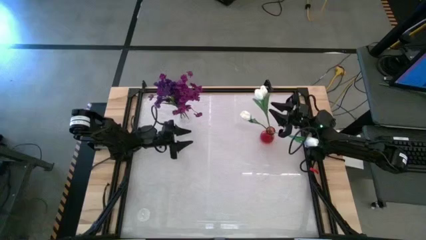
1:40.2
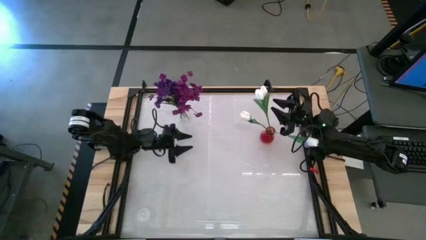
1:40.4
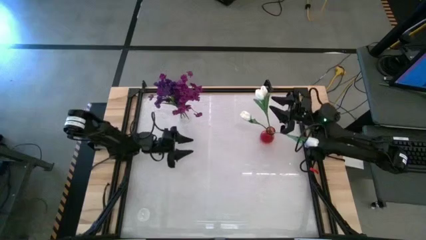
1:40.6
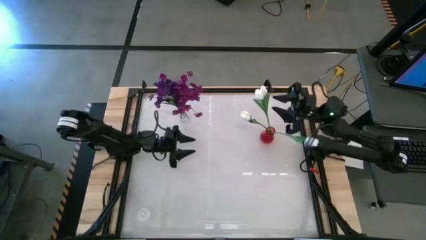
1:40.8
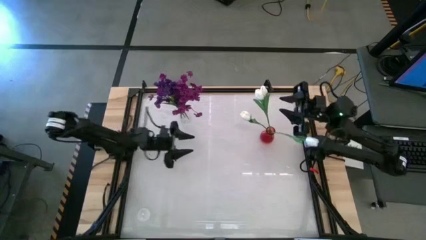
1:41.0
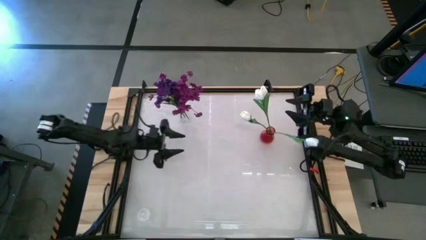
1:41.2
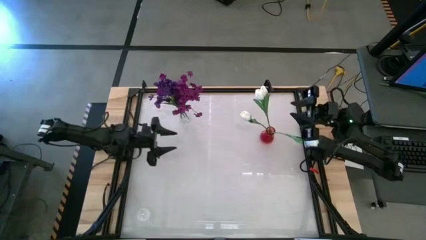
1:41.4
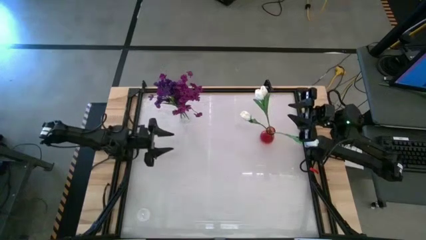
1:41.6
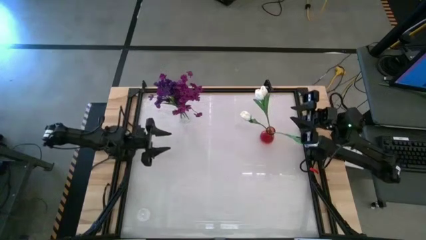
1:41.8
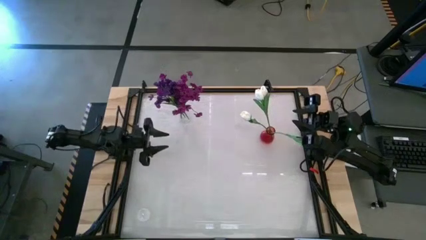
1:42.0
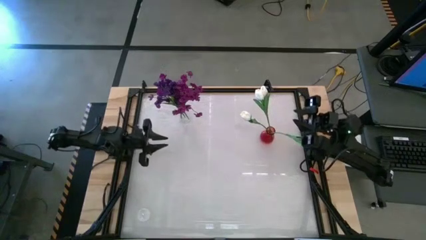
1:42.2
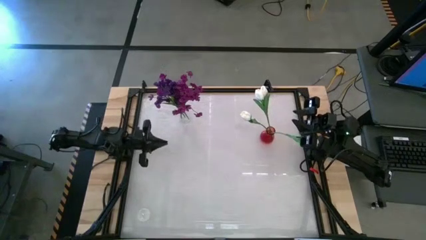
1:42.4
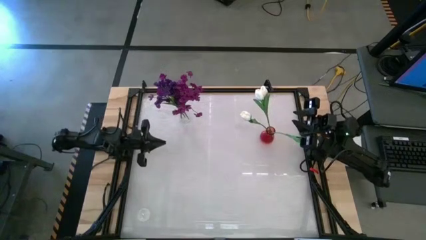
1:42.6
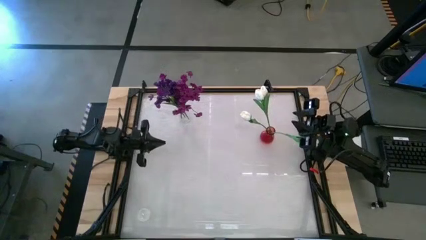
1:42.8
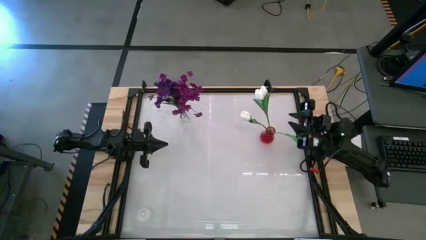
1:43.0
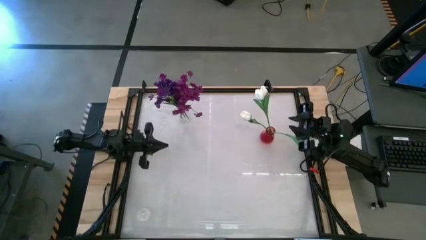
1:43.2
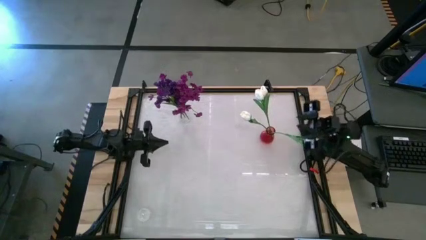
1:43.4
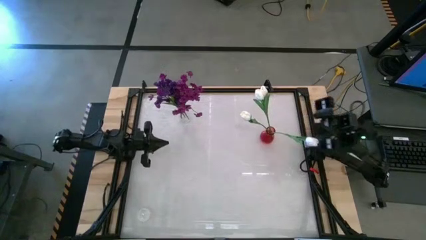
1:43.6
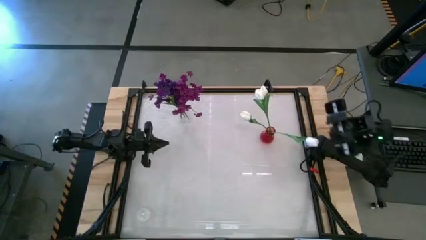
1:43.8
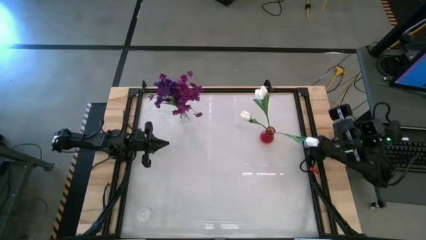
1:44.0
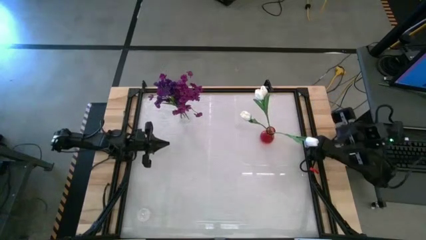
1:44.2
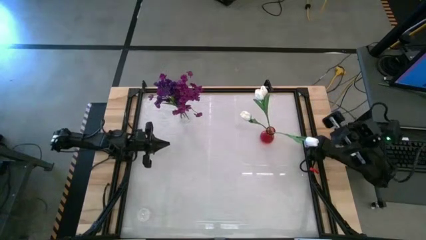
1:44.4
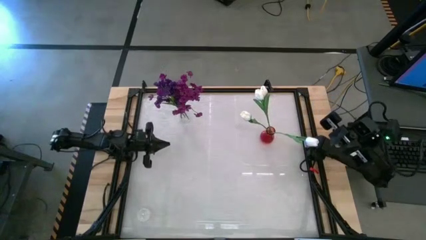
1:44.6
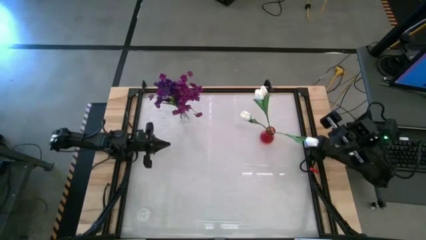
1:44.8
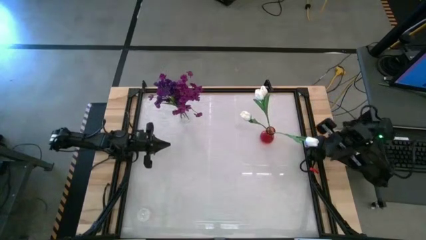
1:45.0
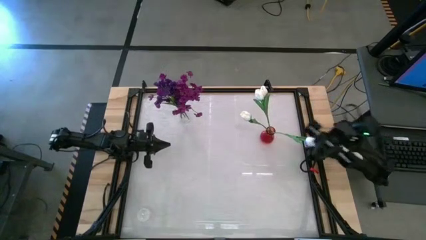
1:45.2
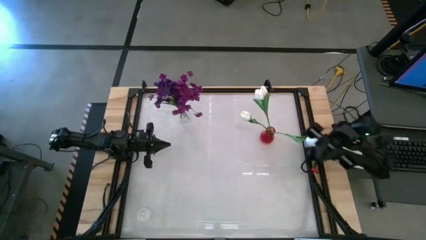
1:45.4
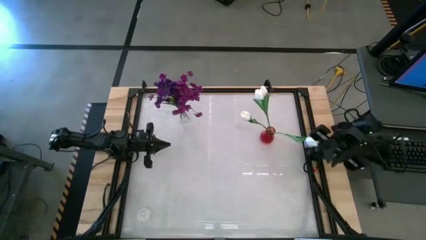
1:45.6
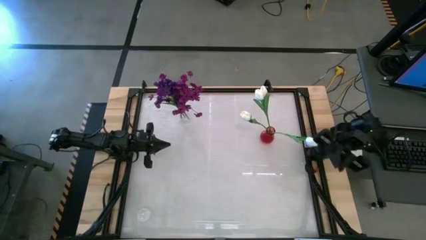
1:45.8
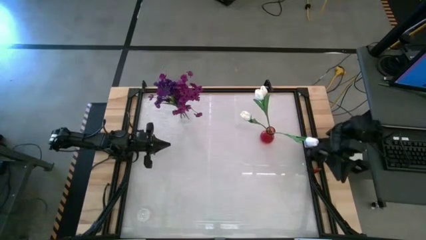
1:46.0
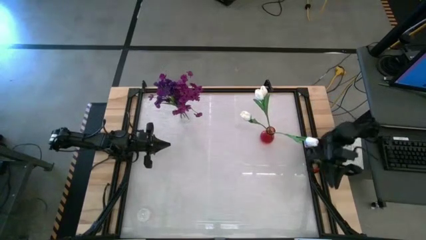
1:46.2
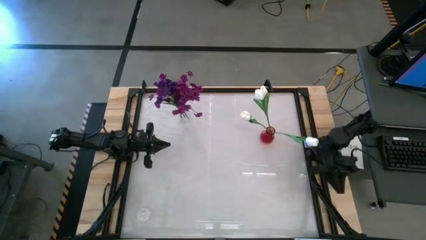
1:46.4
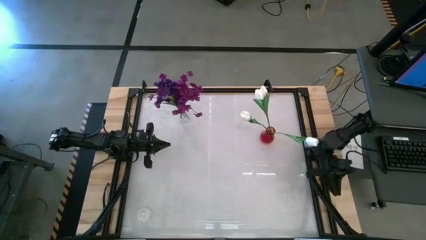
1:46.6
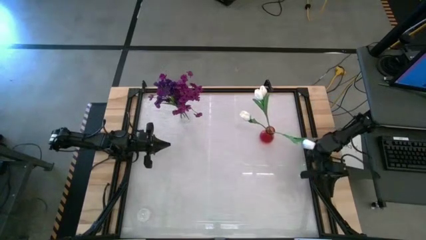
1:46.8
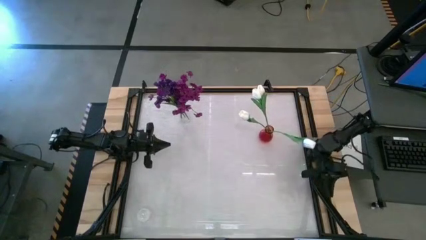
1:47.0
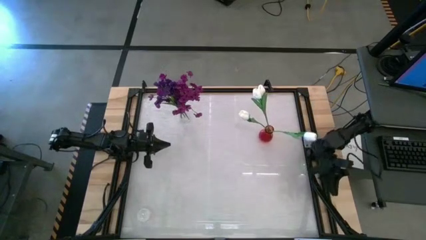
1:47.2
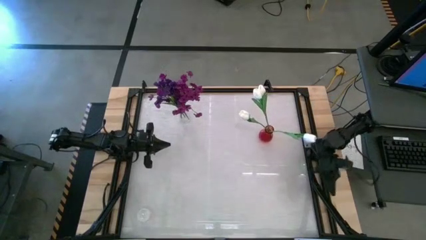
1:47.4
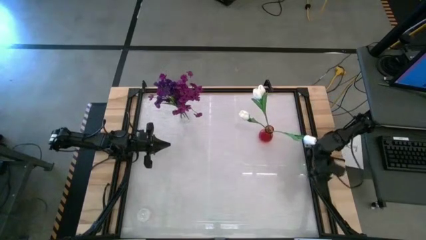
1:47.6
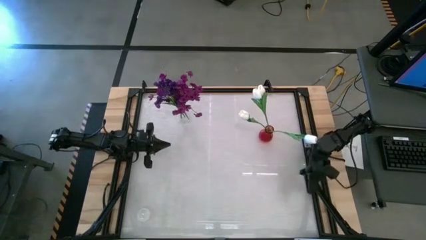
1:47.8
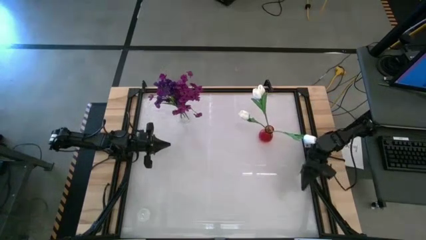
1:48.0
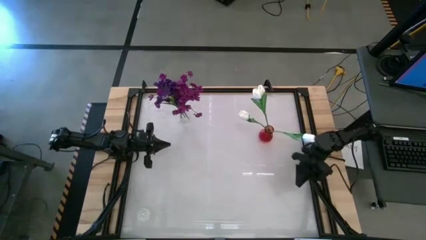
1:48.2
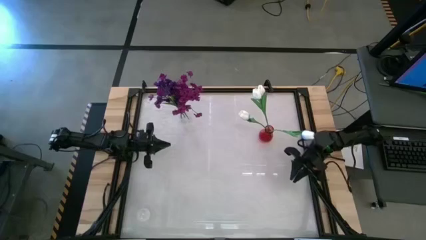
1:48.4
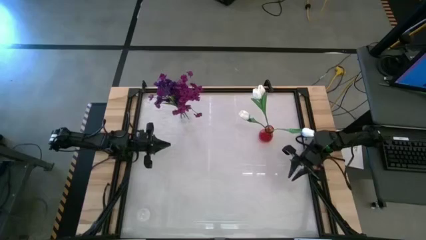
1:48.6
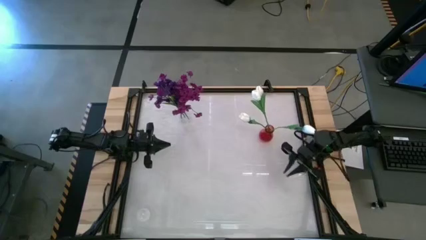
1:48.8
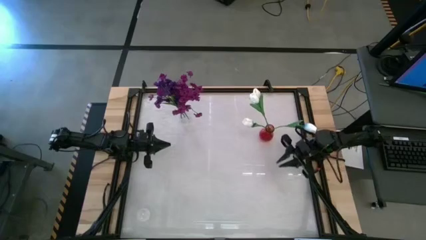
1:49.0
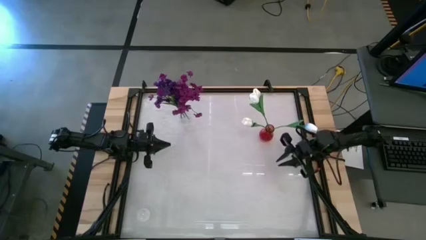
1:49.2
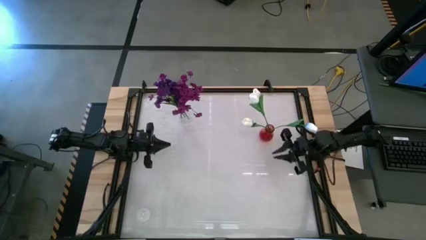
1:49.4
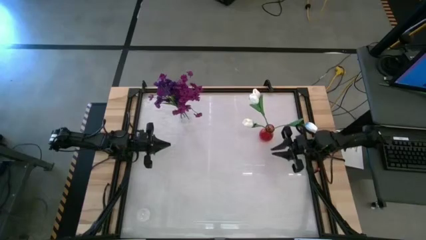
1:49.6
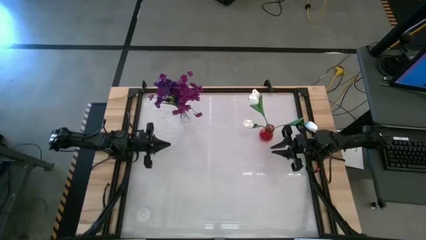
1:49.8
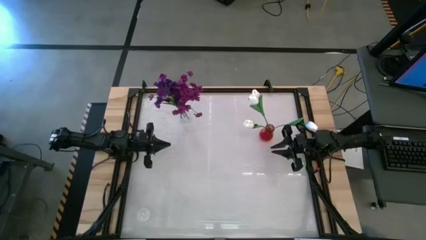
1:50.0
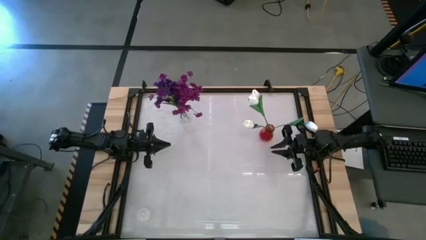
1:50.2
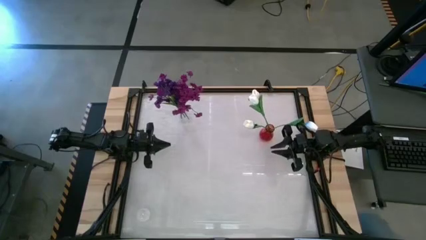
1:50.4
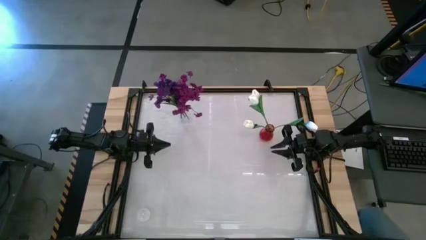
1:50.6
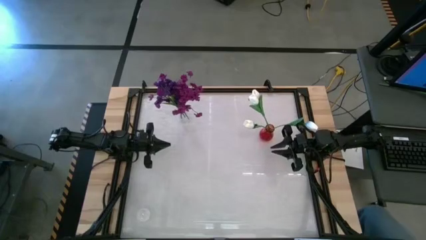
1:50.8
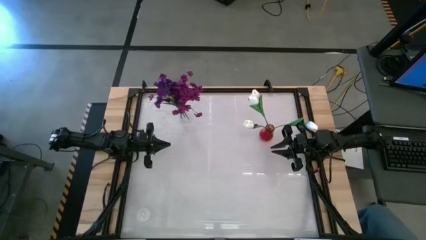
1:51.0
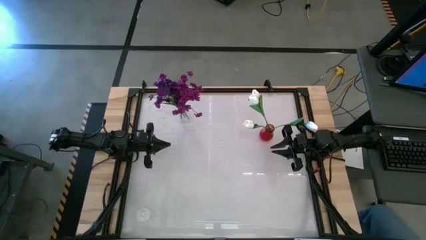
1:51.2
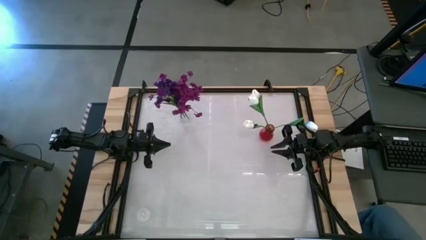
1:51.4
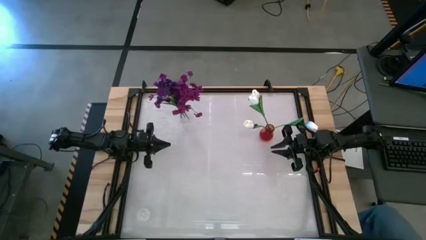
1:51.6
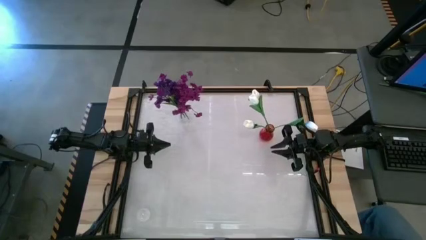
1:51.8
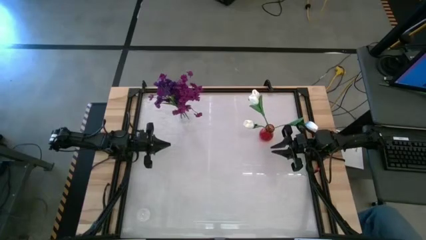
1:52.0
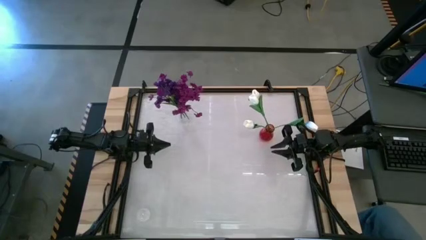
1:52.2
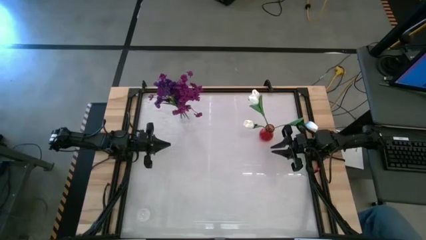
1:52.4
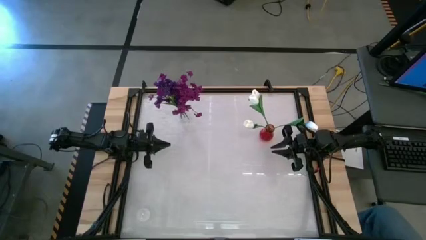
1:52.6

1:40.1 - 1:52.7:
Task: Sort flowers into vase by color
Return to Home Position

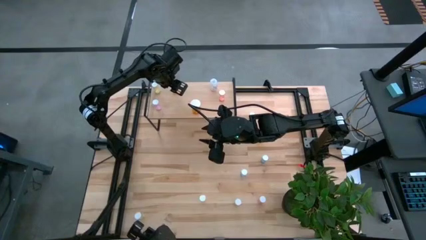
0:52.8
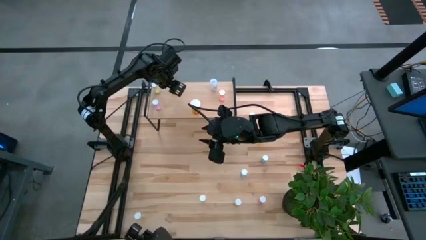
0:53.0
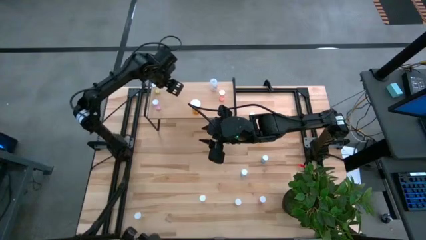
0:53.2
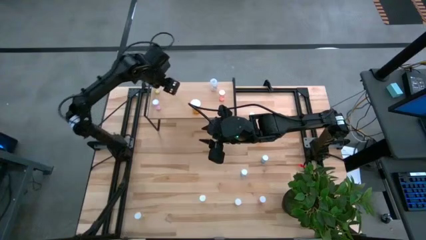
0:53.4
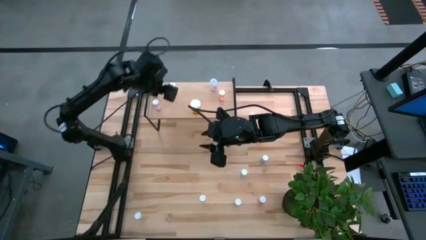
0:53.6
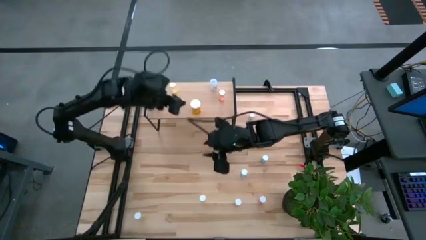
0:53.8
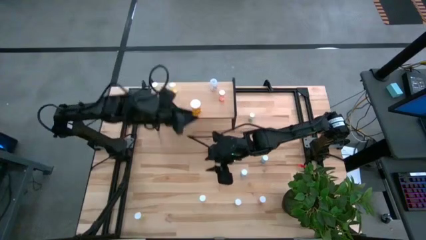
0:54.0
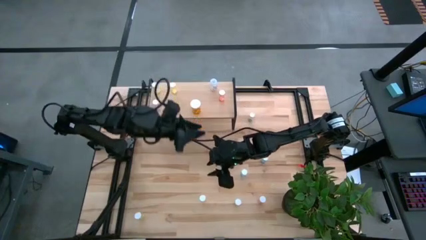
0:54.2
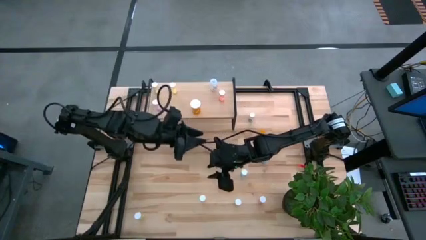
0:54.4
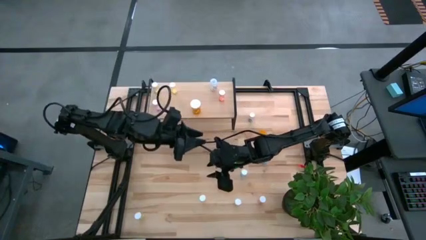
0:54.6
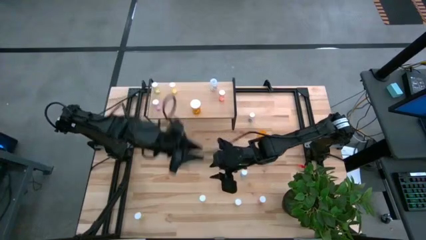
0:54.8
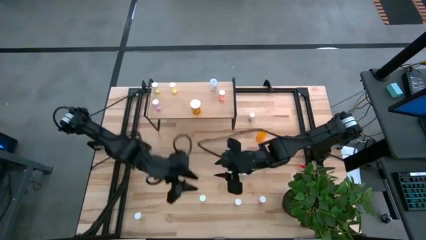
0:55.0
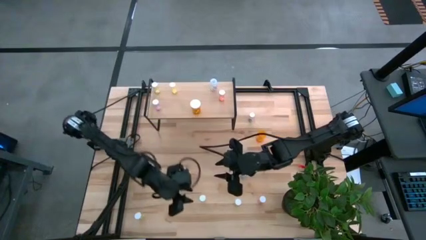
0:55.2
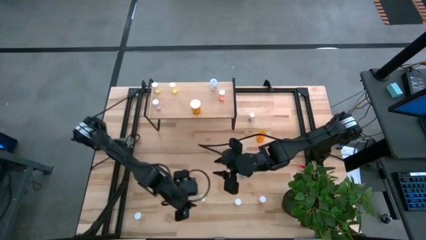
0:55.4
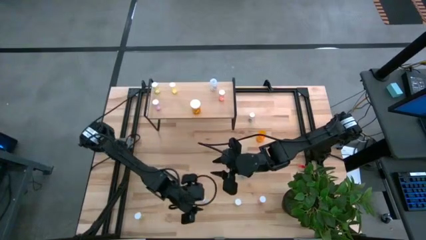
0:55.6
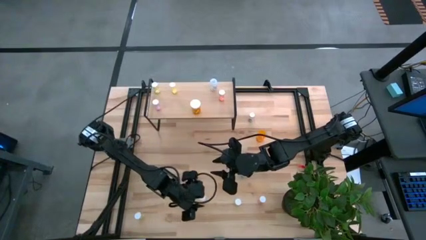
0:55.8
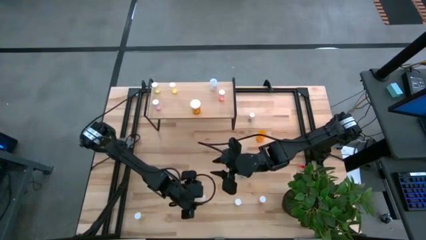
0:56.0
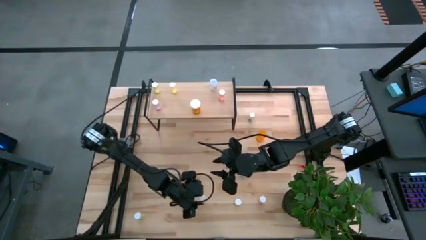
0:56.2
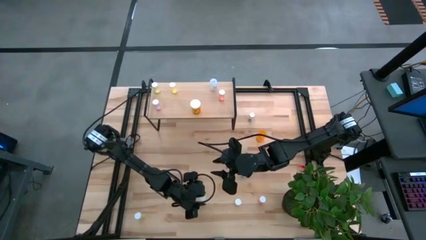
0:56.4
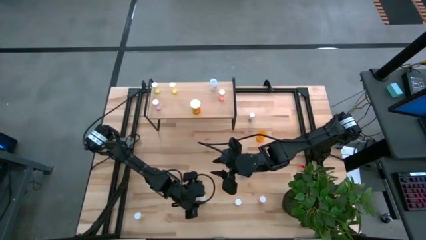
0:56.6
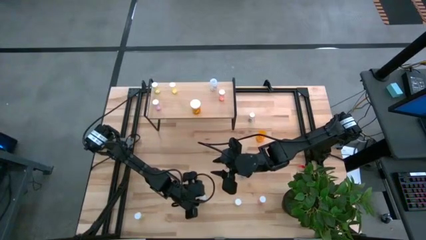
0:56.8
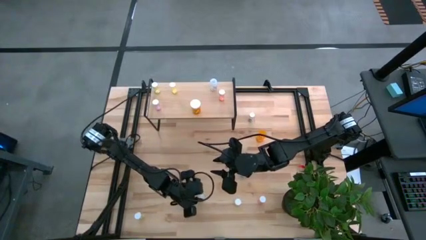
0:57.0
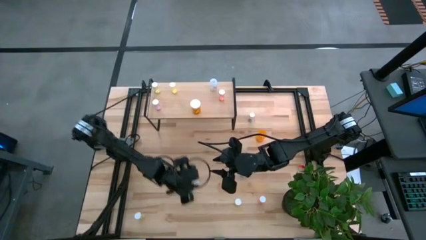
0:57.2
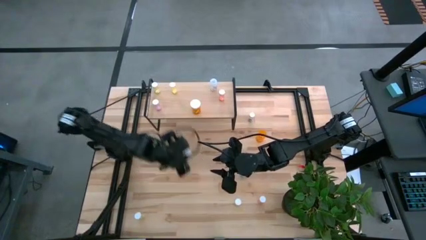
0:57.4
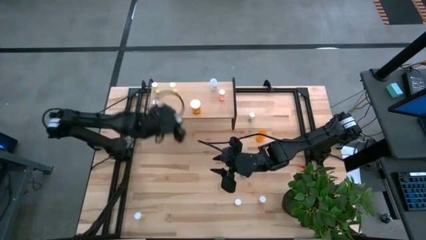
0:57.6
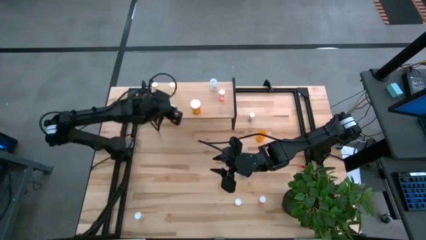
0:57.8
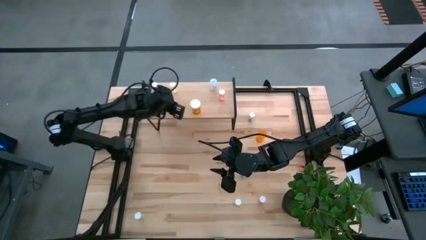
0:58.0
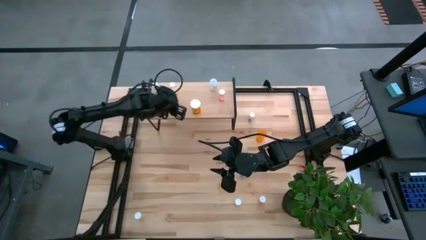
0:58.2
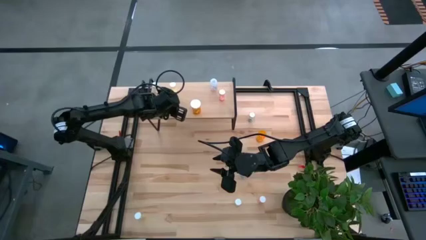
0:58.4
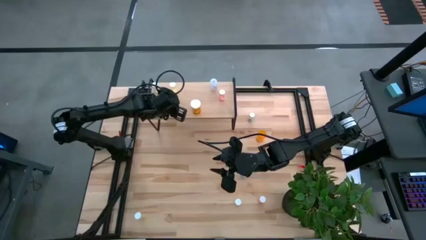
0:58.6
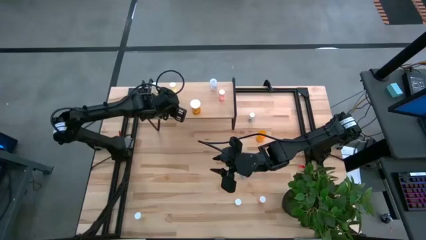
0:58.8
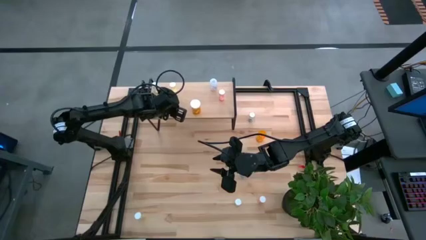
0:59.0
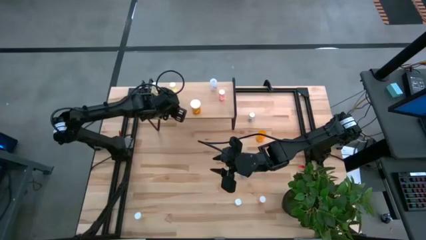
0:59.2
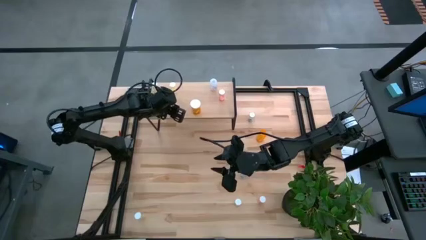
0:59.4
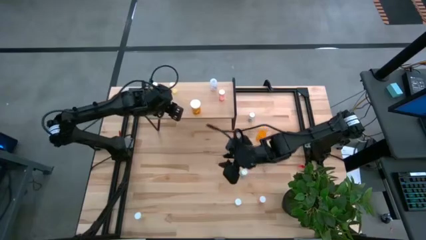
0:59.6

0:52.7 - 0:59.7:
Task: Pick and place medicine bottles onto shelf by color
Put the yellow pill bottle on the shelf
